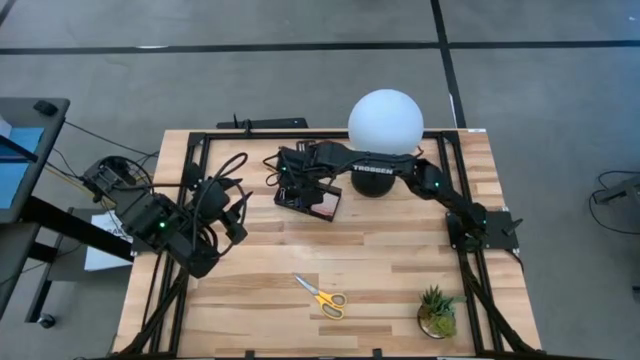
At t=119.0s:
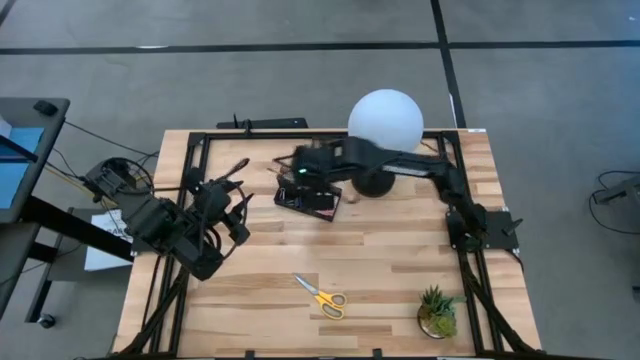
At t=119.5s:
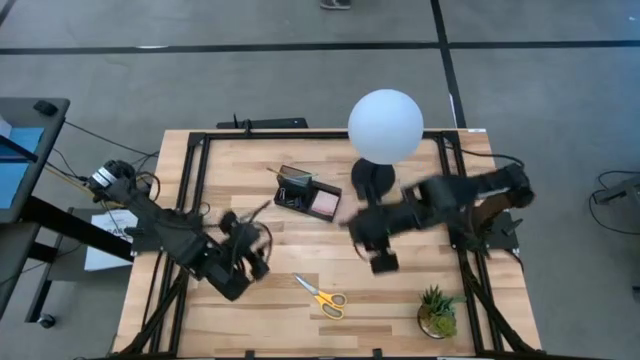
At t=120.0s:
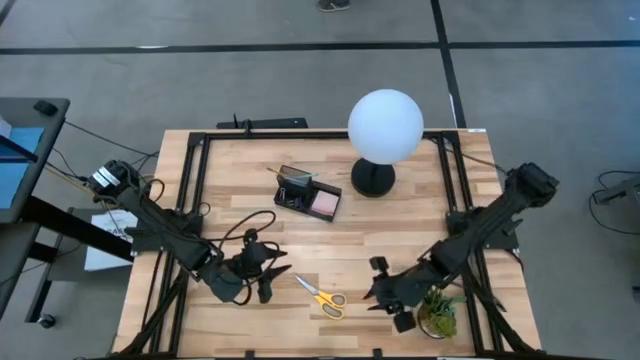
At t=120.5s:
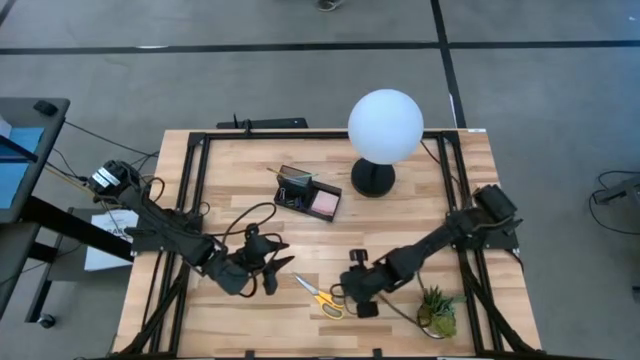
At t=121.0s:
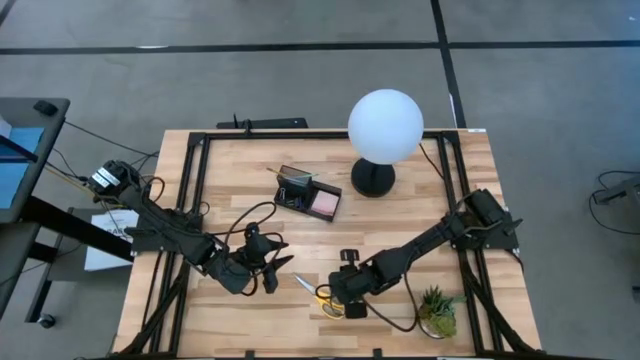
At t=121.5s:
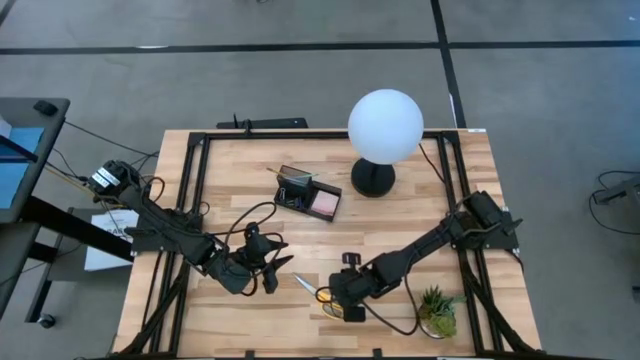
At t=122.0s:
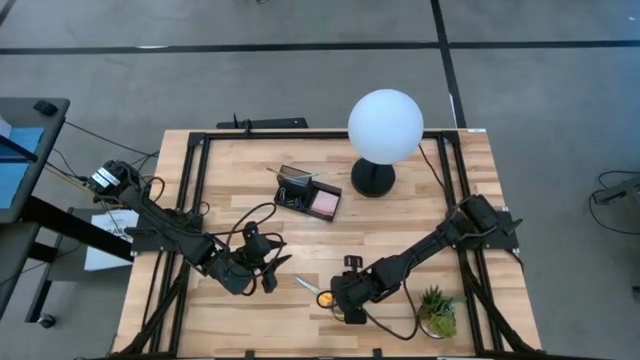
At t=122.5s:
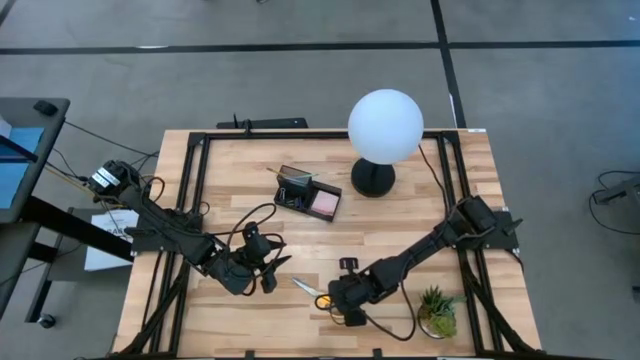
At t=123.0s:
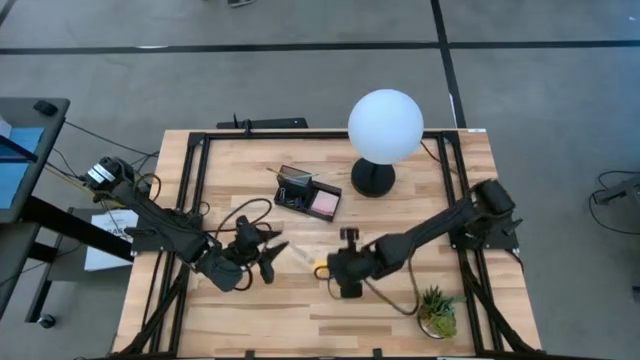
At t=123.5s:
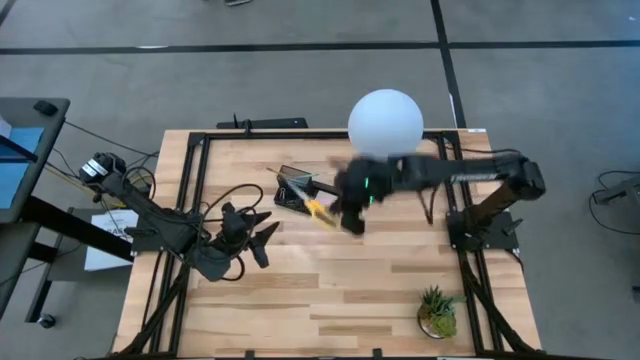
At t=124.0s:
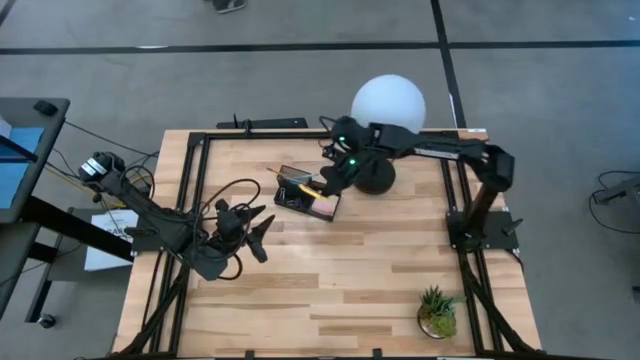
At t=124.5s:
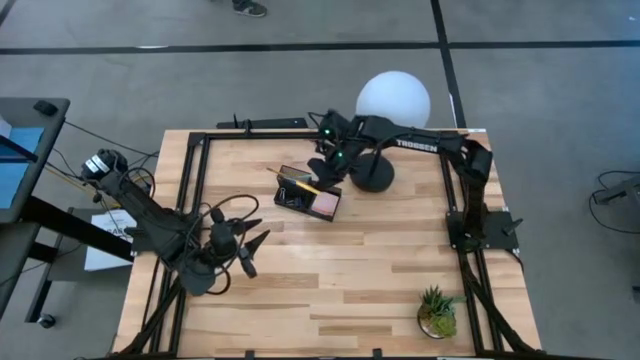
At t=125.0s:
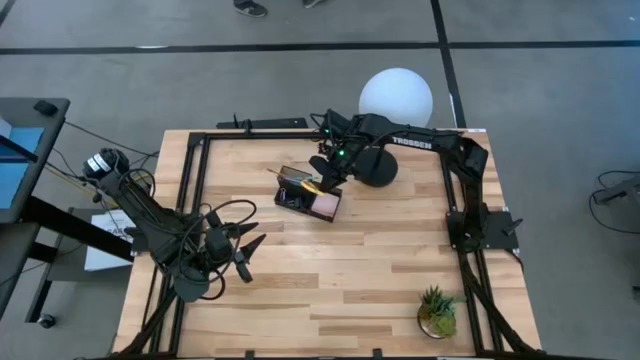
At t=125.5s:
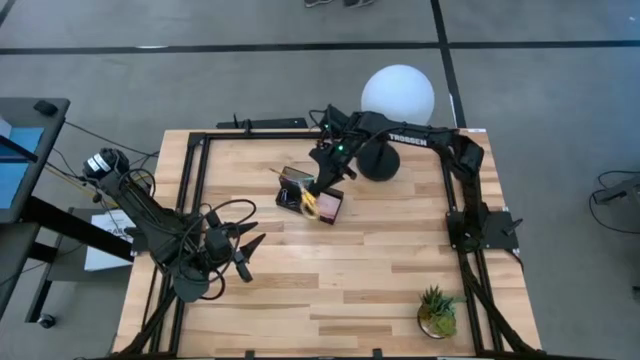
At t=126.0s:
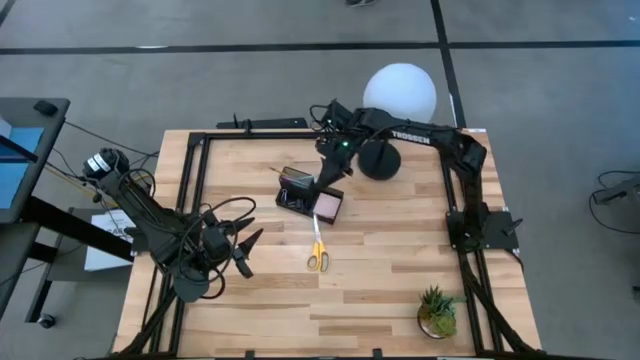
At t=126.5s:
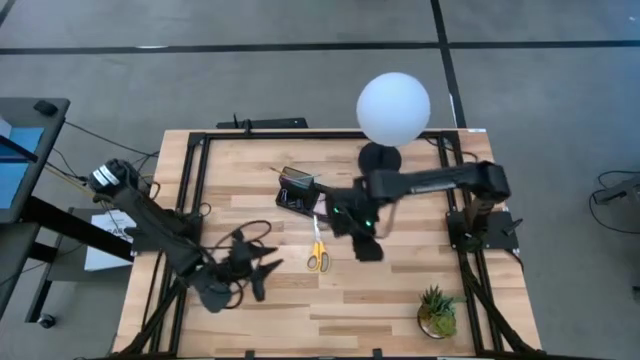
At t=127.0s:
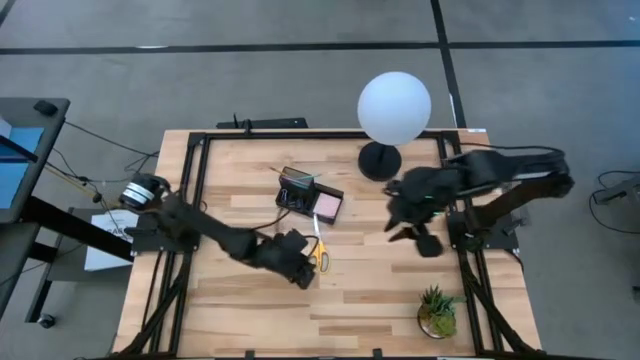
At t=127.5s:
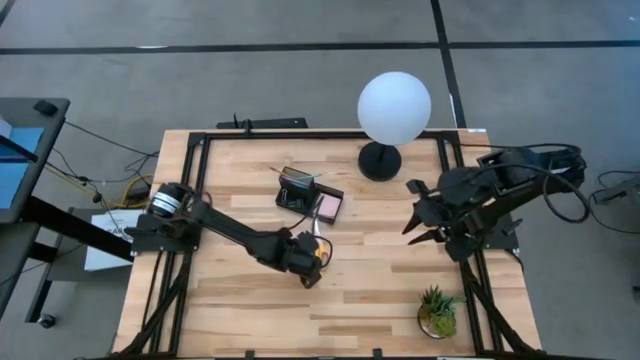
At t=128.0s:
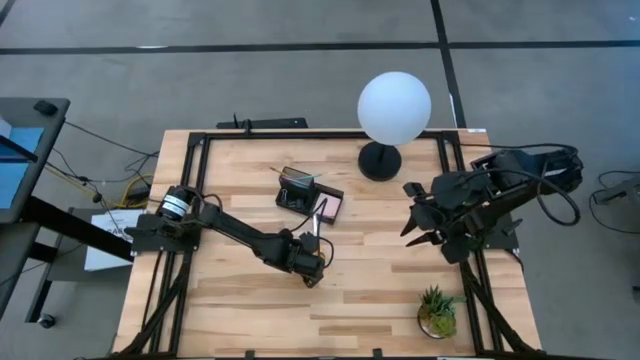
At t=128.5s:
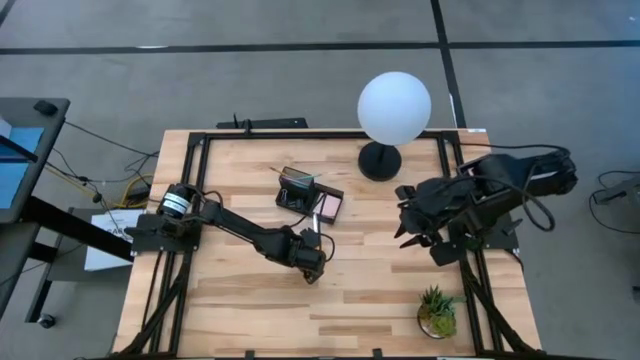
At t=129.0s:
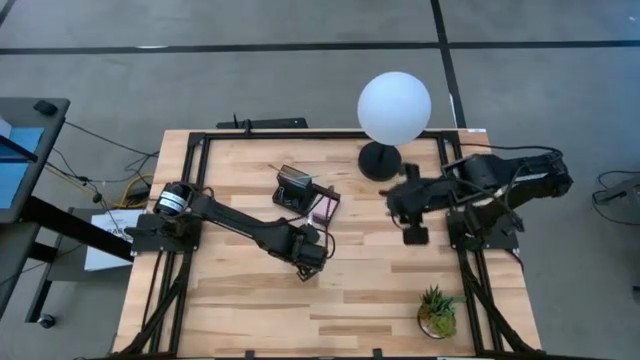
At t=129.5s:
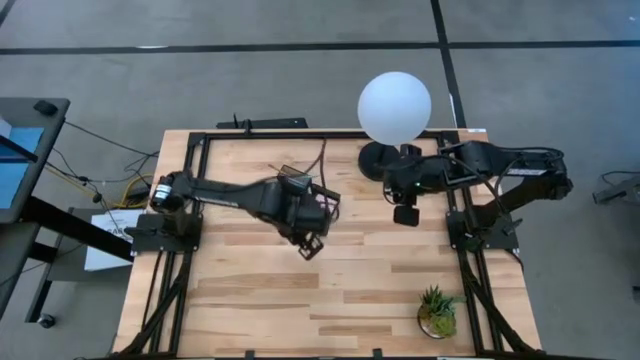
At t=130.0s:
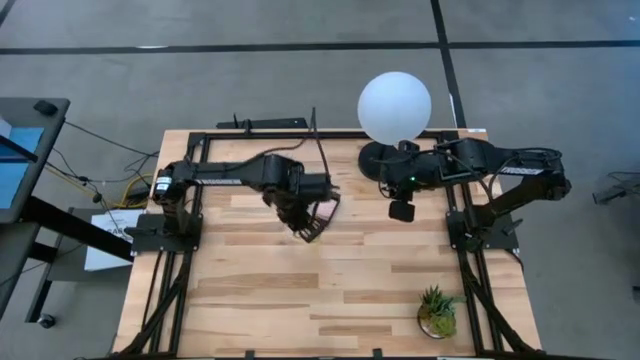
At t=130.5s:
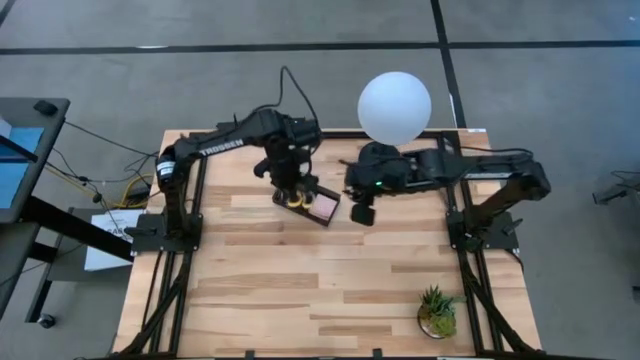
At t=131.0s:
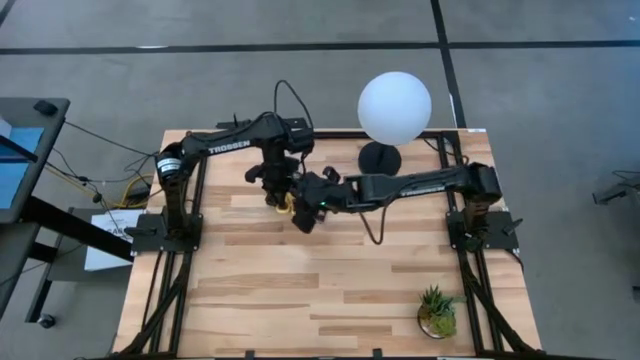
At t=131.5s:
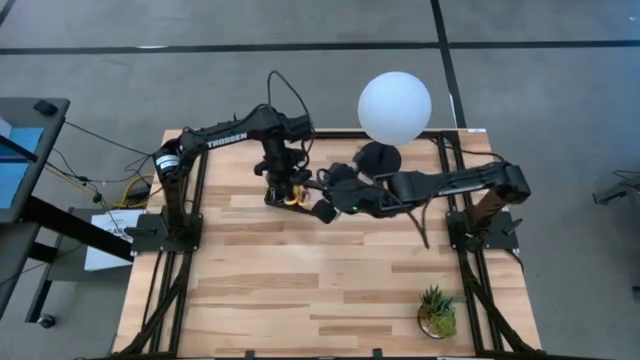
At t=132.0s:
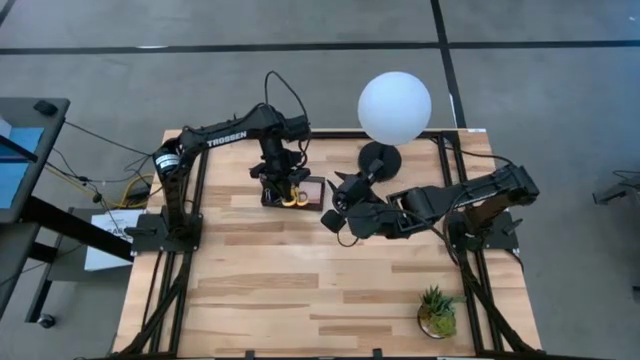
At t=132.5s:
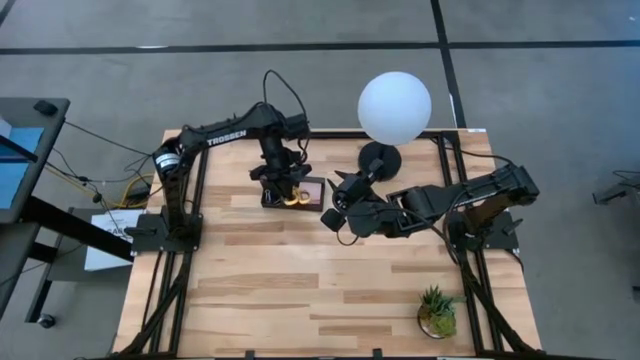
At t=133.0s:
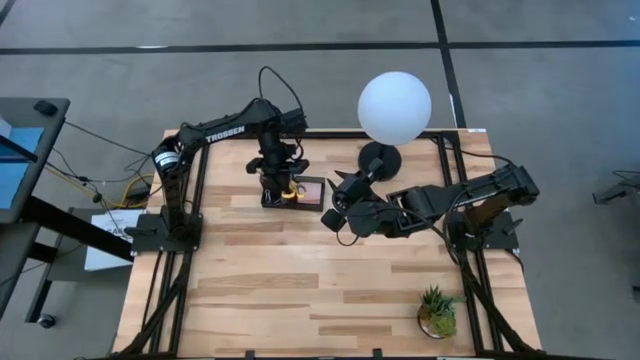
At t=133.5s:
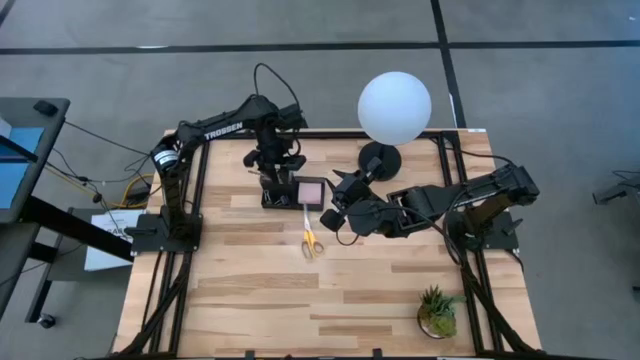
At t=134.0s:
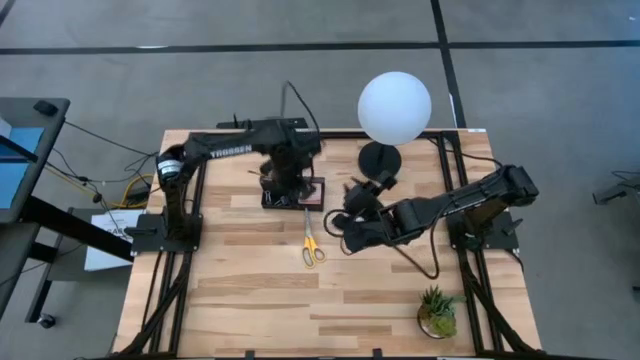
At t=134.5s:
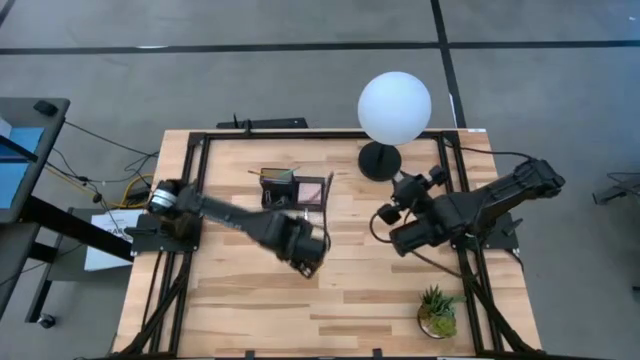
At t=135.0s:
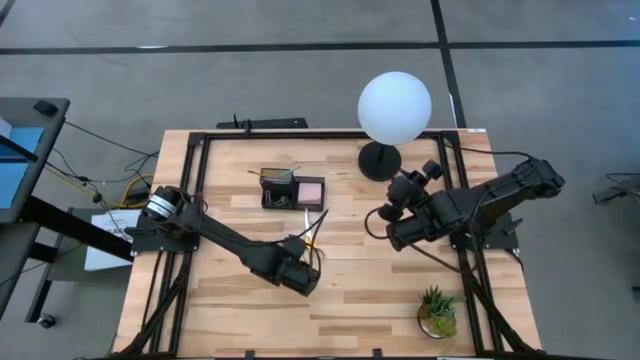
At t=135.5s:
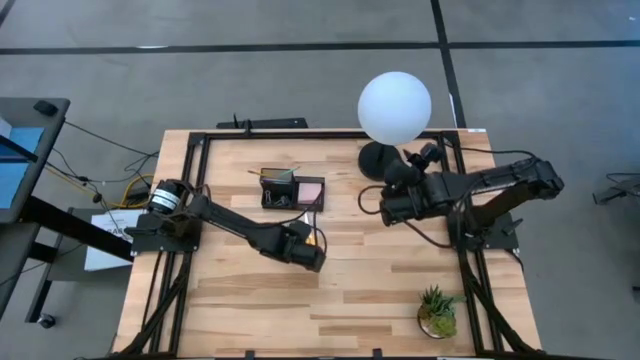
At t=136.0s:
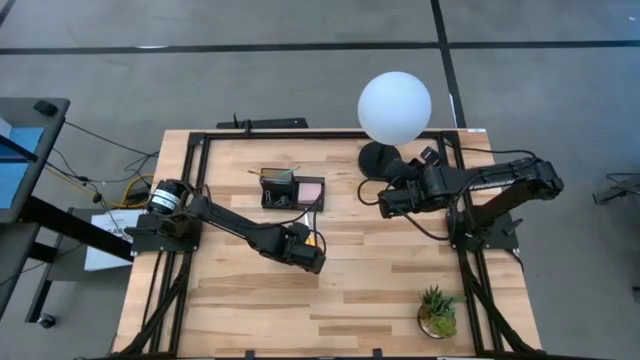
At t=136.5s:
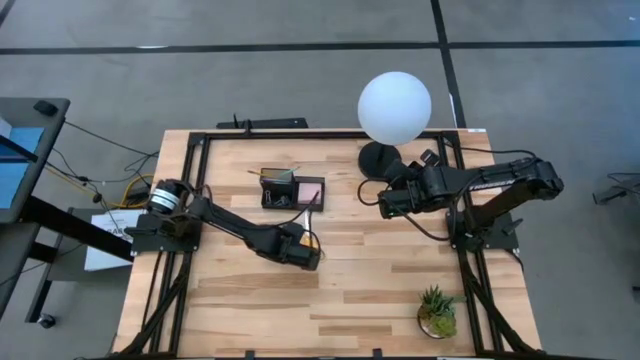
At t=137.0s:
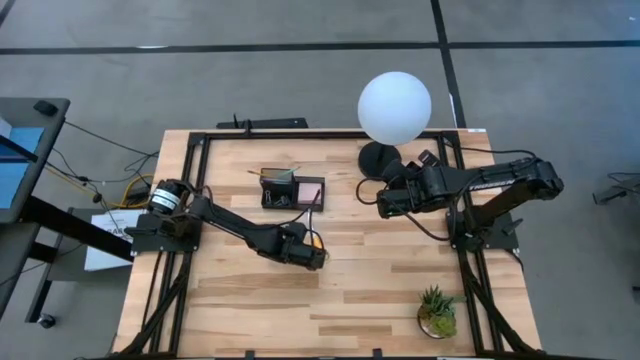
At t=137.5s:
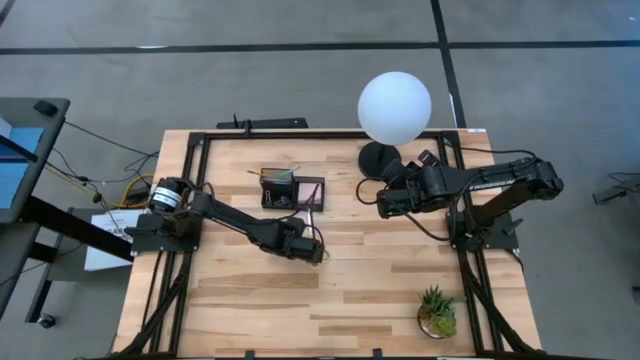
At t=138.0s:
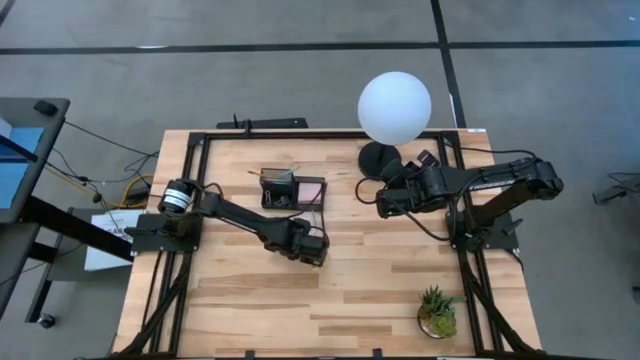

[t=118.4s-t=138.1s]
Task: Pick and place office supplies into organizer
Put the yellow scissors into the black desk organizer
